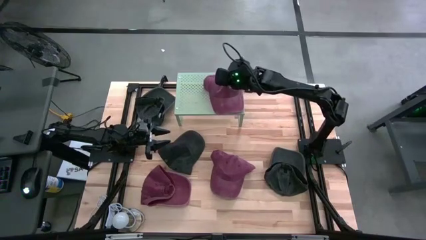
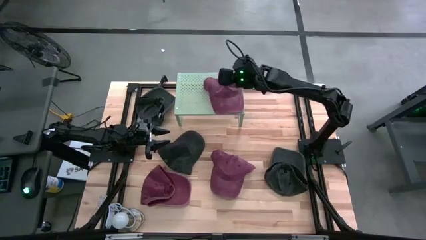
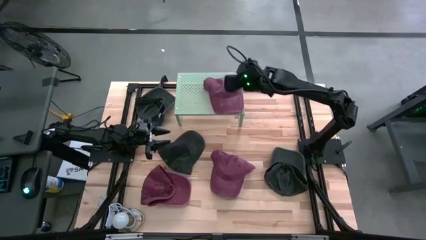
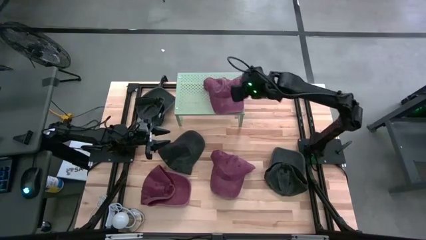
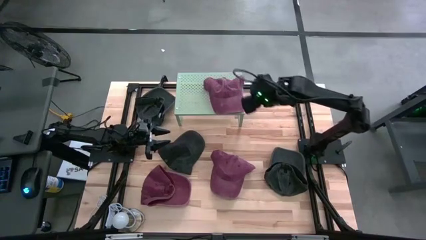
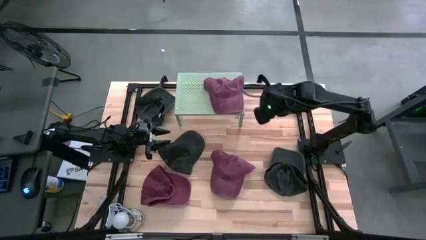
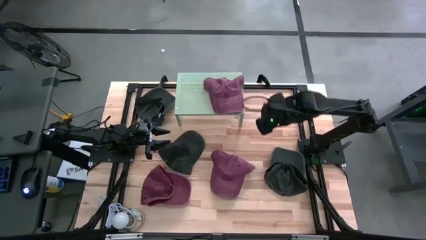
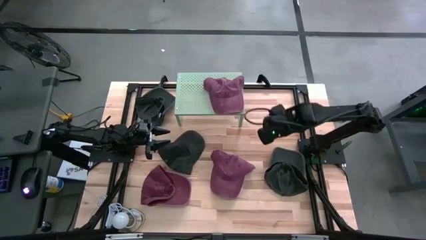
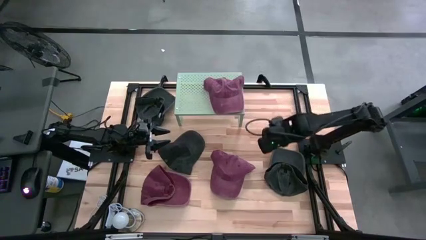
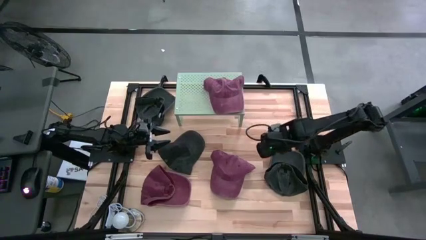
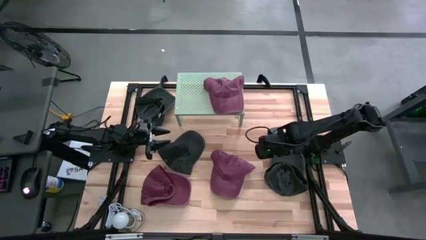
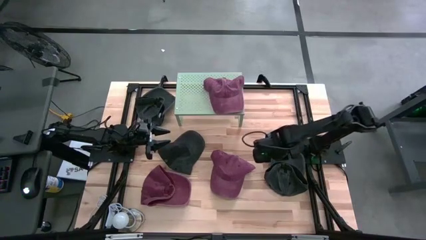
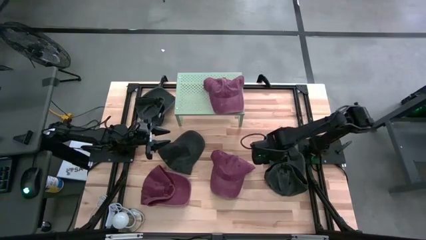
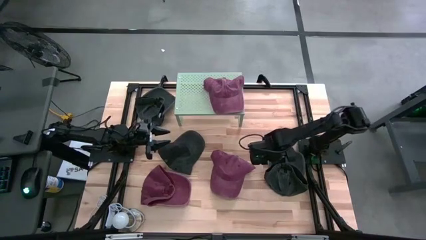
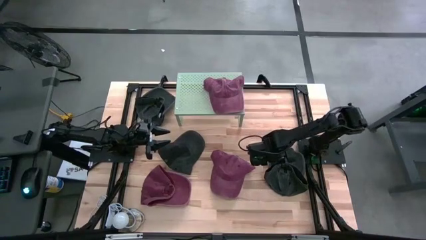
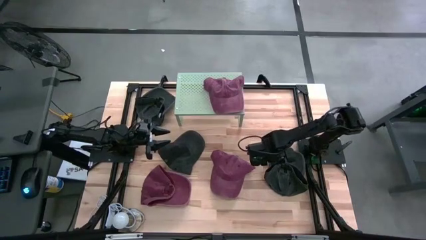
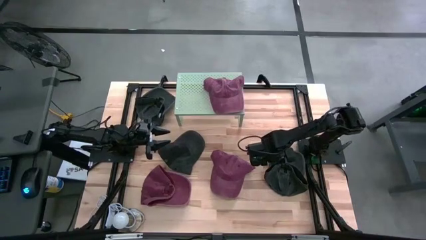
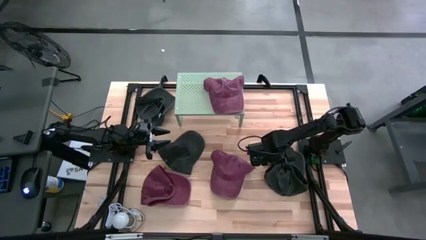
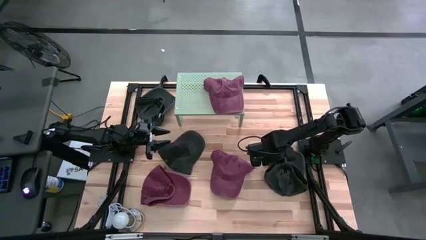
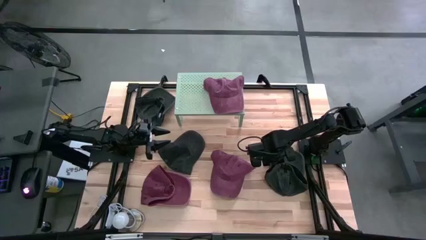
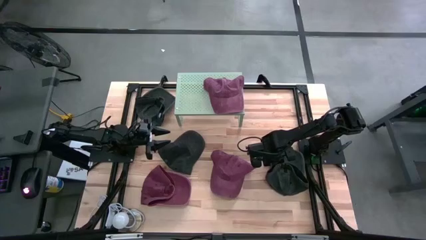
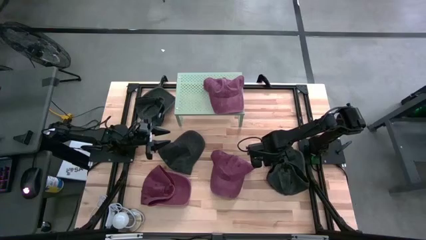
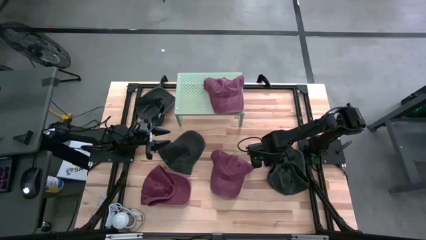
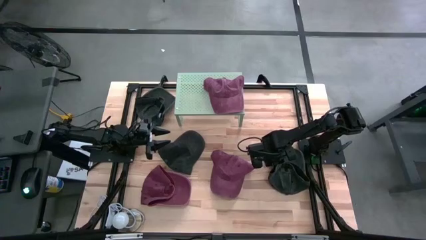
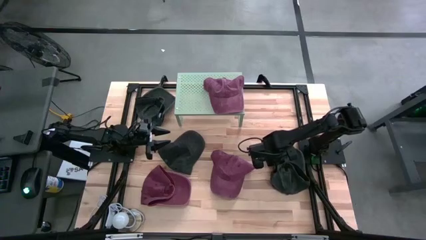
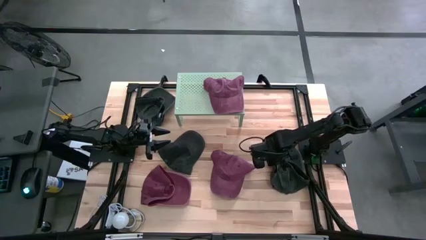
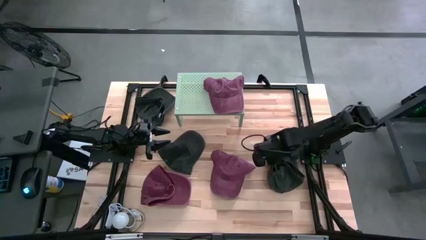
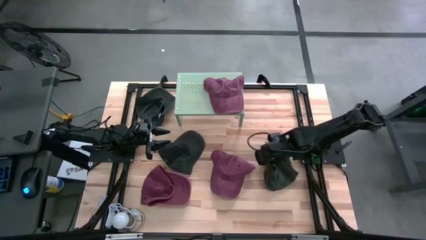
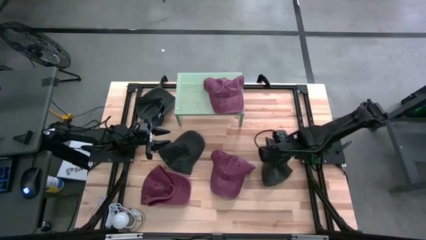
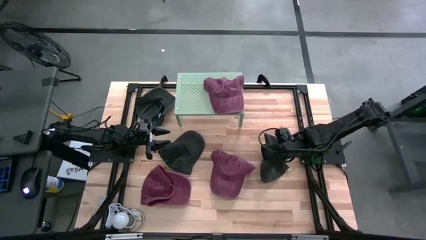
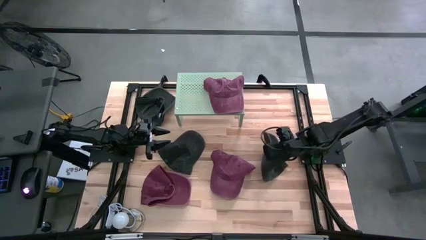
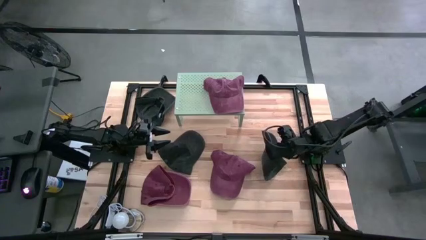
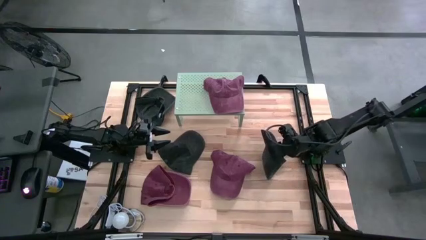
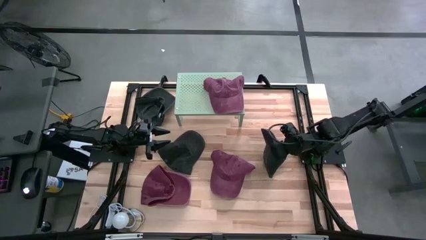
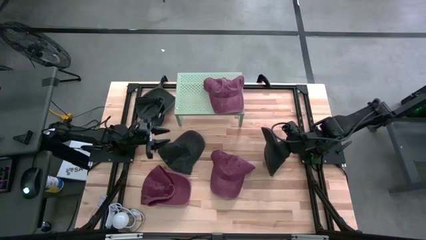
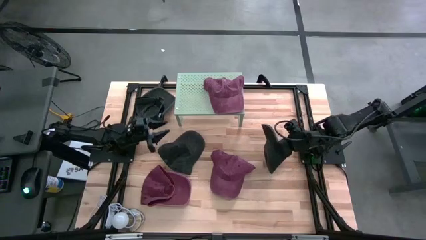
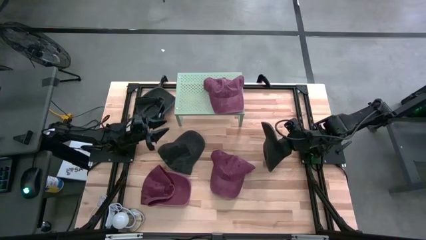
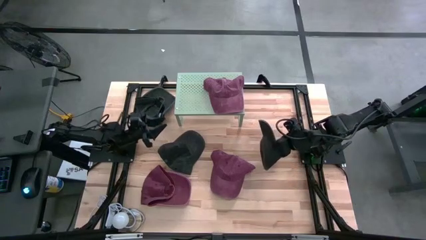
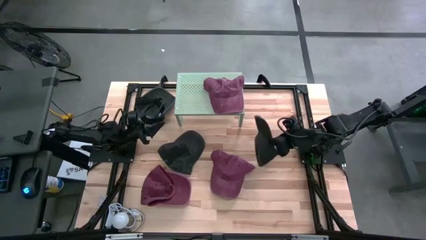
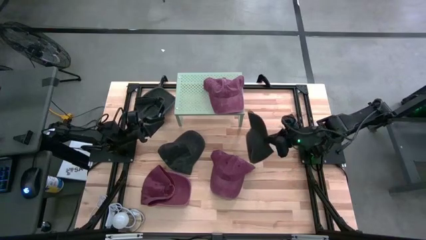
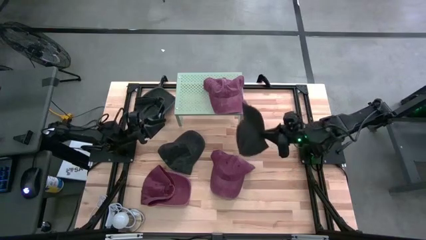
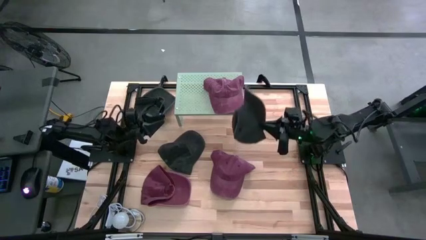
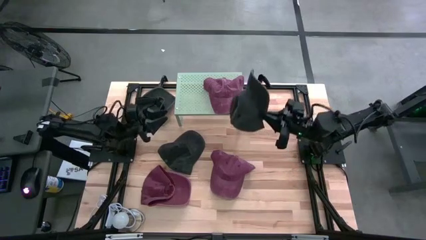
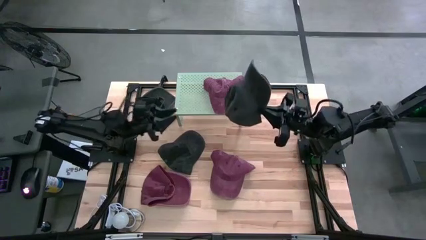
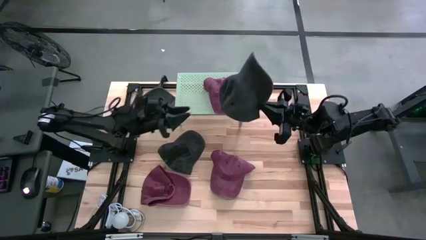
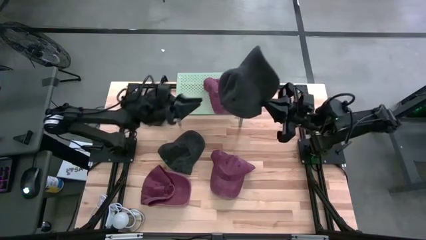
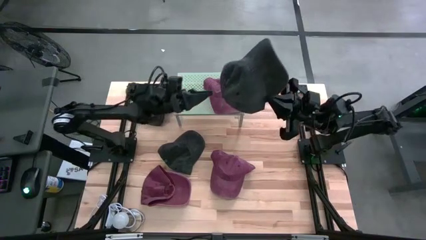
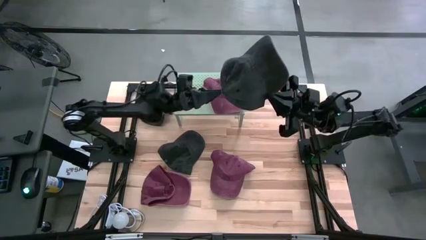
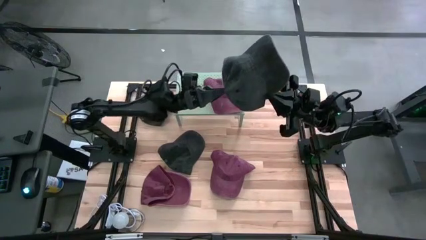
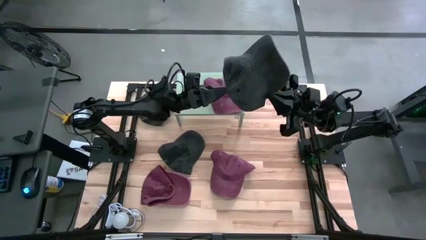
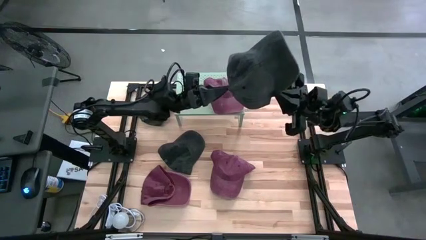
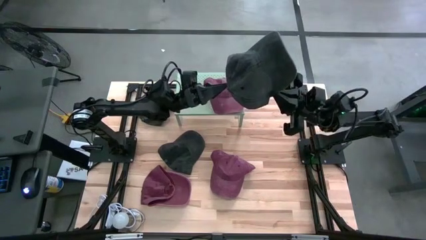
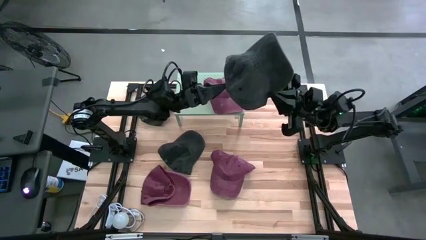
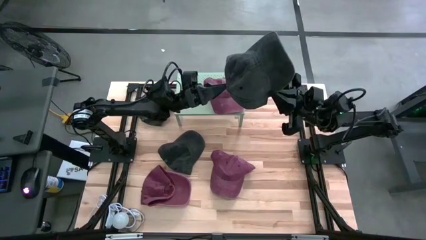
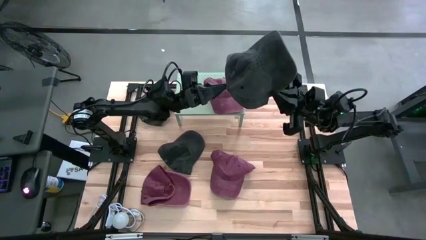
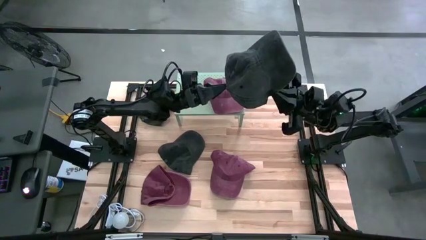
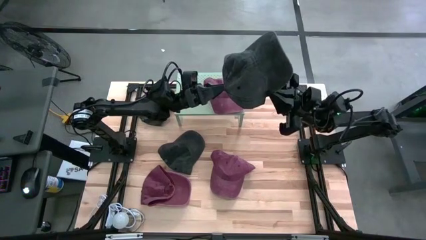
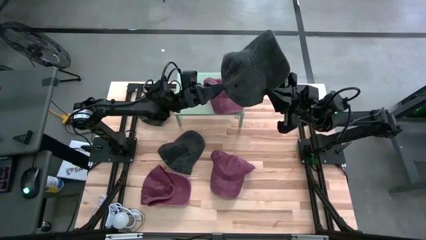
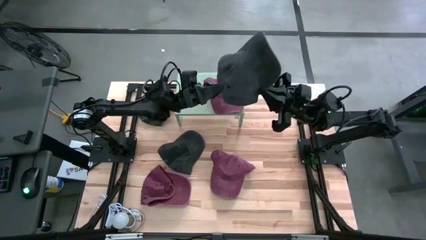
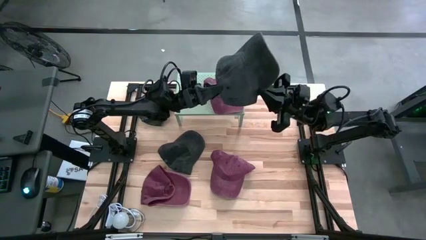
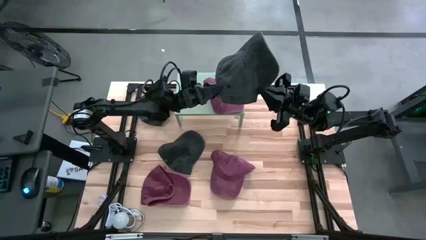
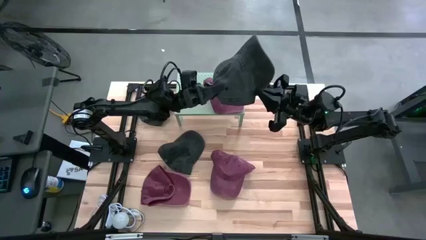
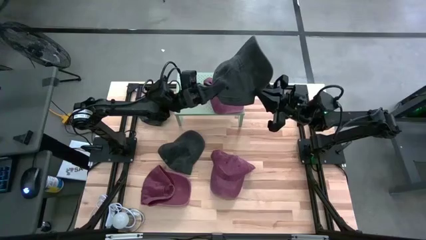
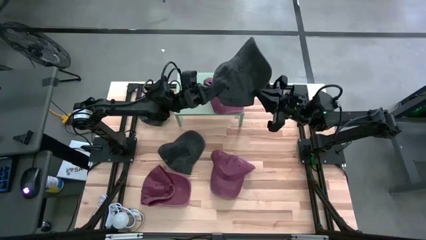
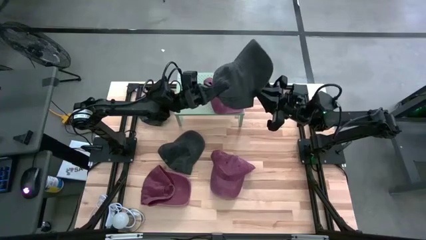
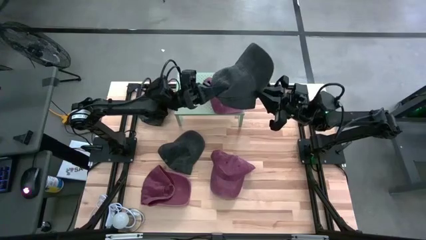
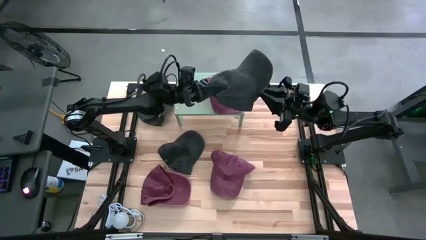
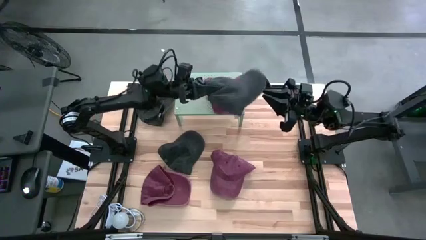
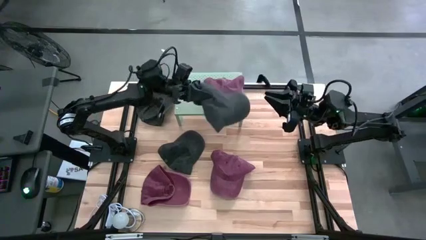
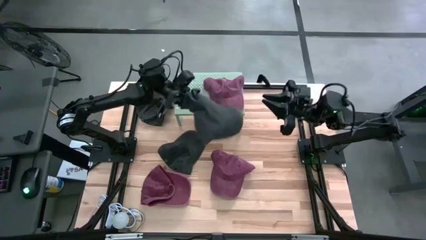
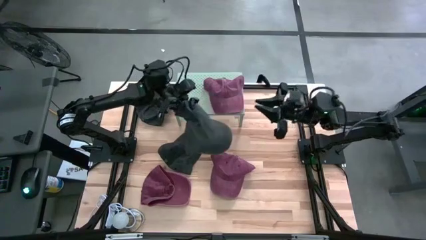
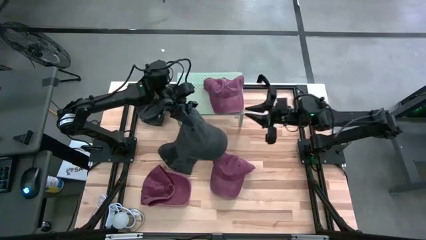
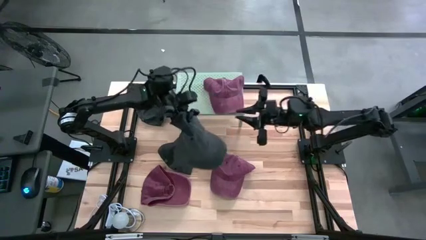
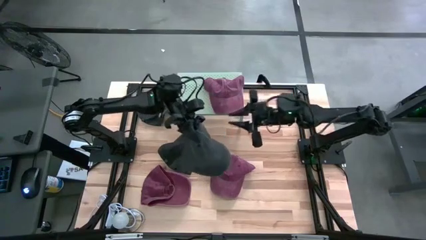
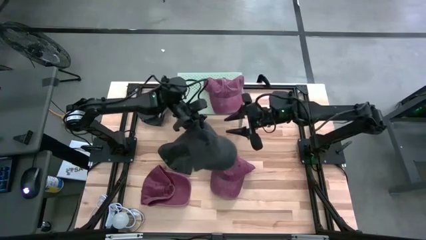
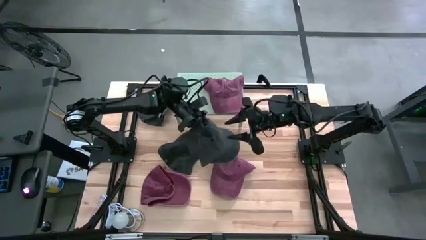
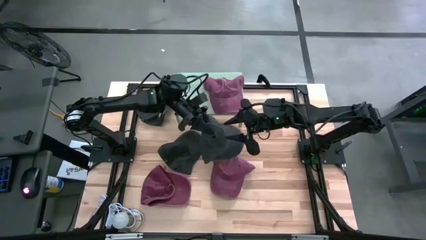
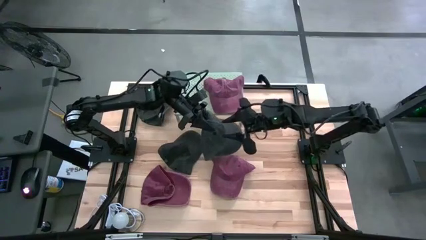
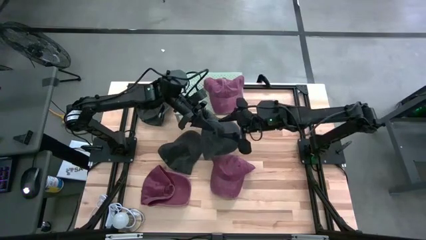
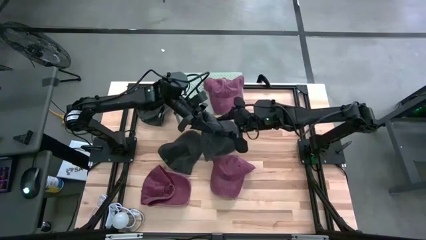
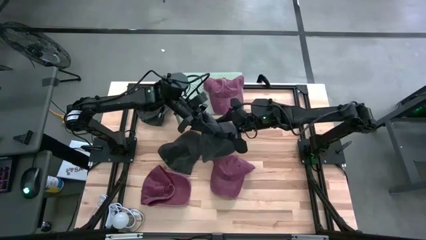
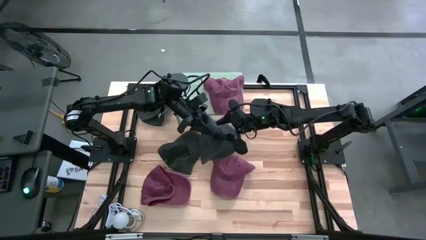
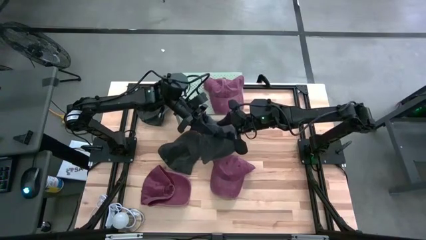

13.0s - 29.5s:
Task: Pick & Place hat
Put the right black cap on the shelf
